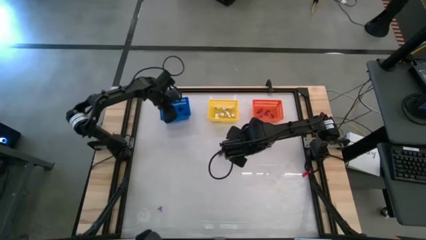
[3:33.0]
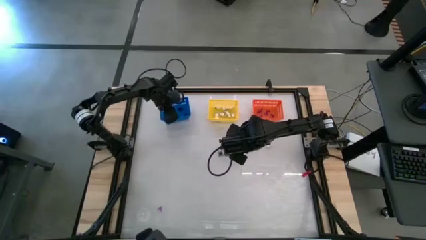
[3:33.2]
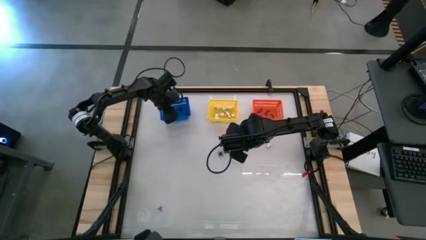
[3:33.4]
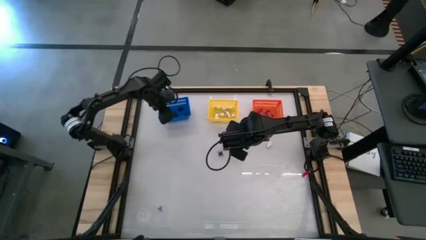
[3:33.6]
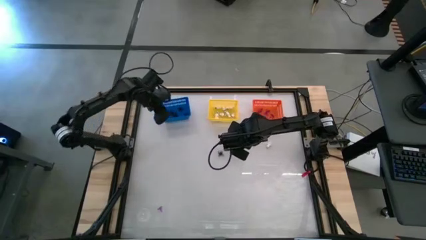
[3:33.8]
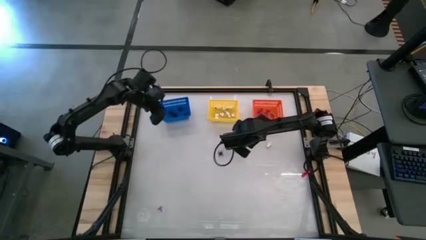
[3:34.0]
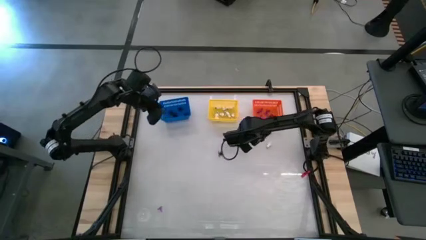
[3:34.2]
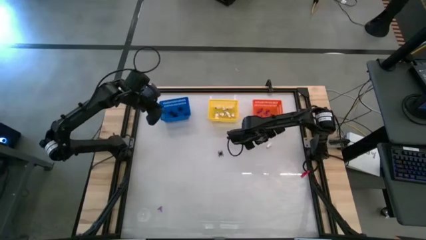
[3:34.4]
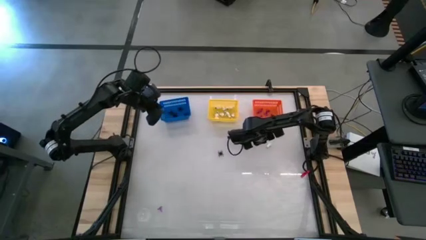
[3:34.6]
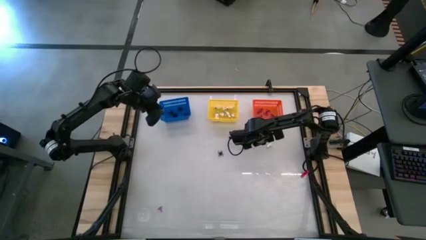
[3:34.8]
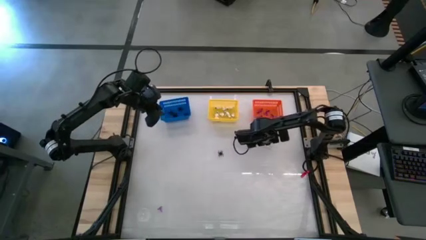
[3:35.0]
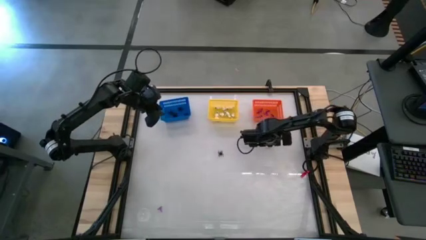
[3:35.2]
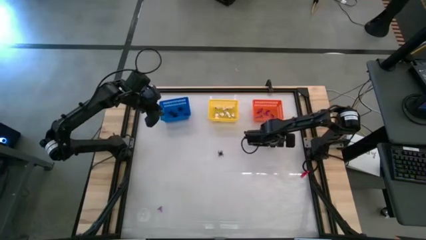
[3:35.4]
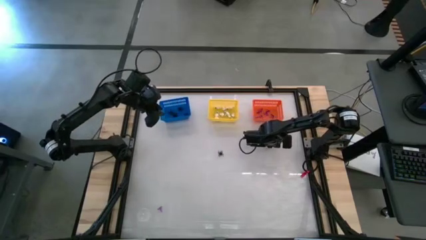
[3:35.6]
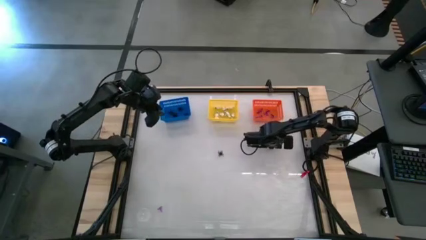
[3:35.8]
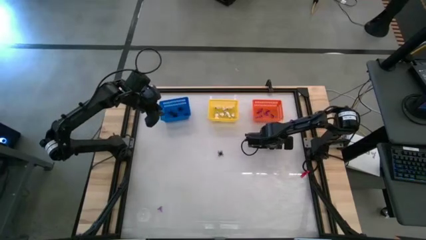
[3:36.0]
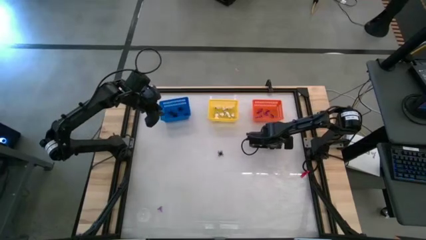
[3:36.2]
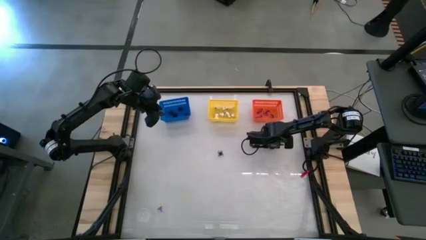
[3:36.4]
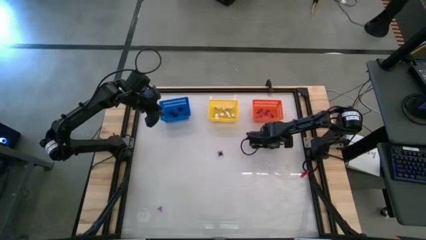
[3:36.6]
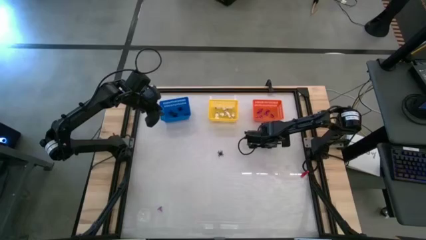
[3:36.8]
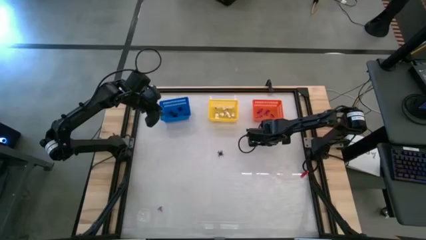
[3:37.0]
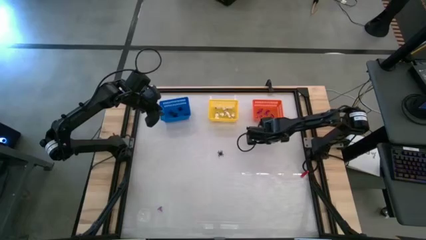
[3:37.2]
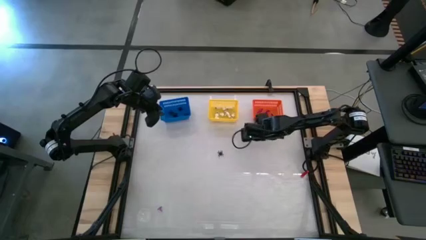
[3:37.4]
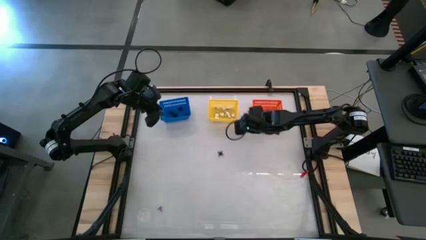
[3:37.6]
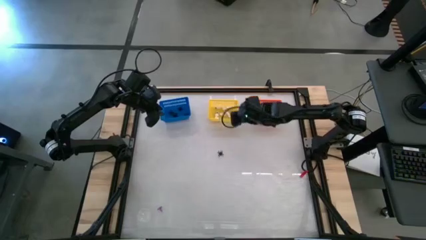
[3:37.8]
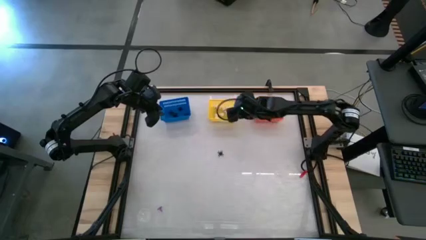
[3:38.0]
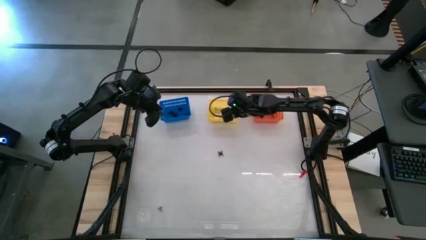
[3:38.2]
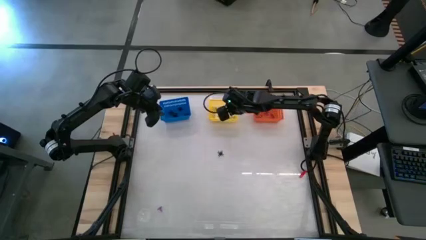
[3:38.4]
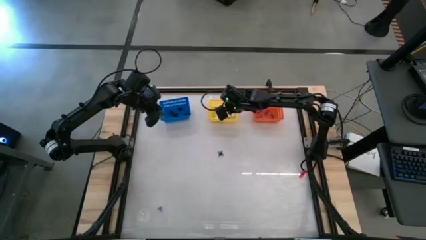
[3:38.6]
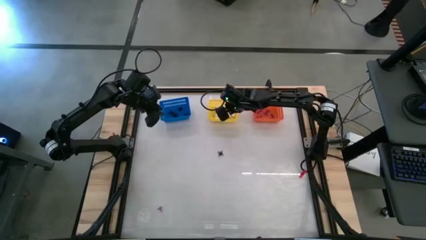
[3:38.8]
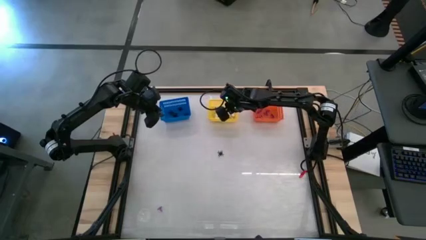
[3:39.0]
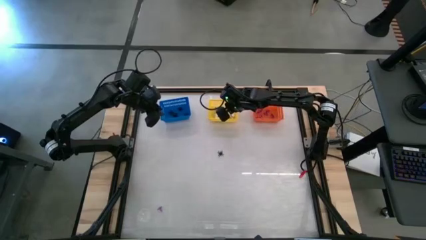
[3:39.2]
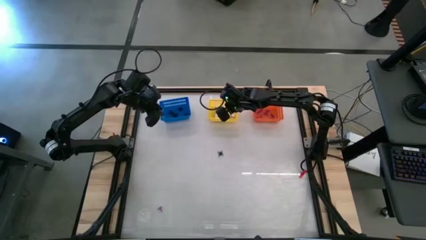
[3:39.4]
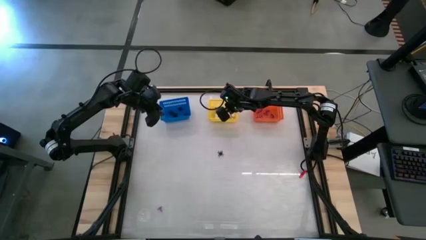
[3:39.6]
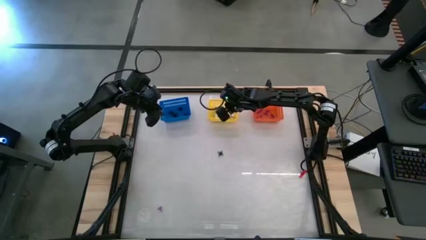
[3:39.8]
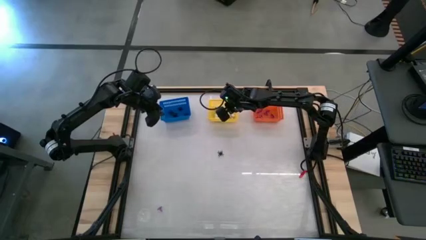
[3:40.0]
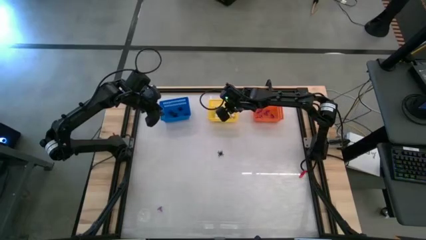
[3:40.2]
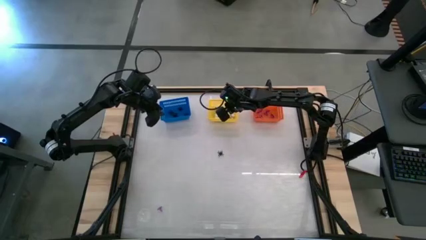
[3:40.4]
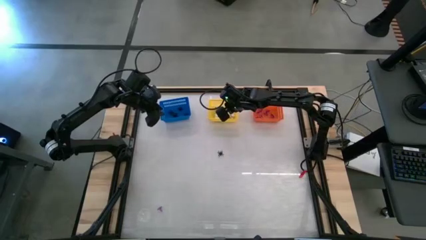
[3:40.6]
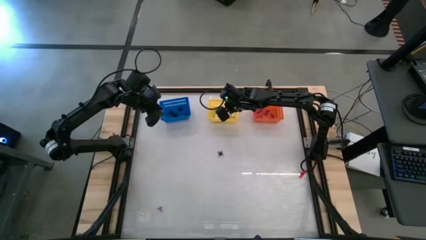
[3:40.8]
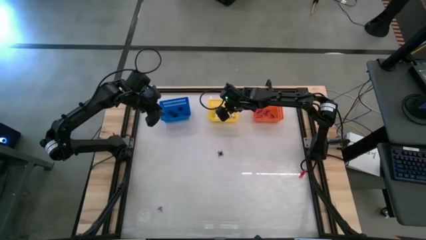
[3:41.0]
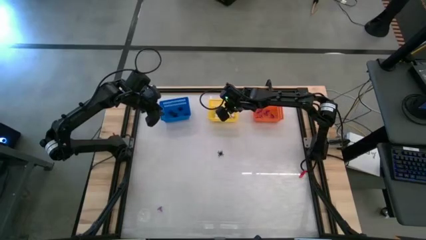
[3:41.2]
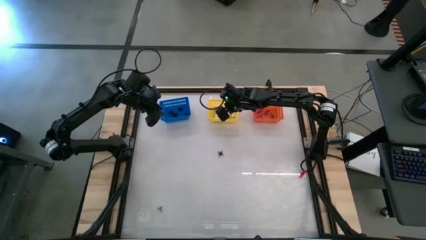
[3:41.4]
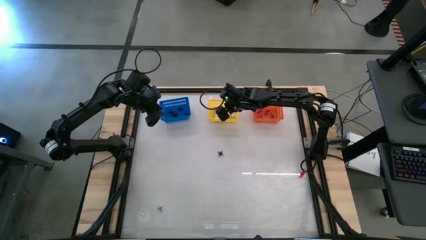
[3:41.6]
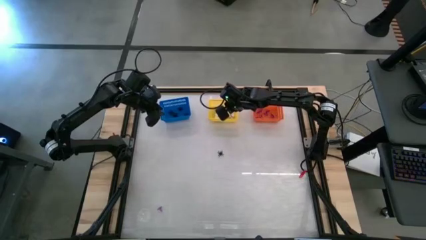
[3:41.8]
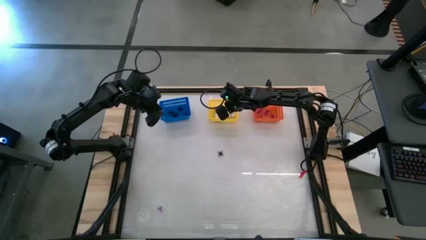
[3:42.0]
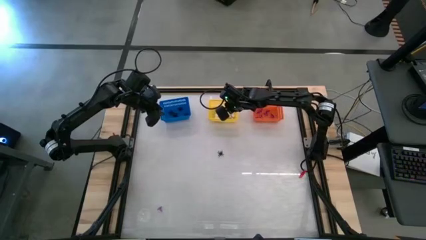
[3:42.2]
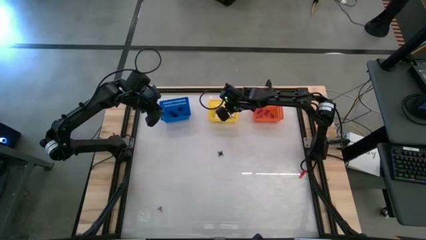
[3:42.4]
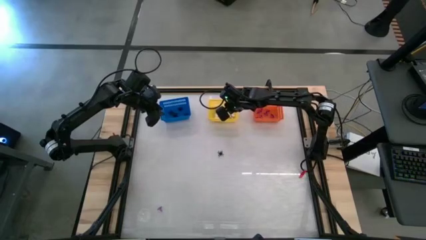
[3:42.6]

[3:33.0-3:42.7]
Task: Sort Halloween decoration
Put the white skeleton toy into the yellow basket

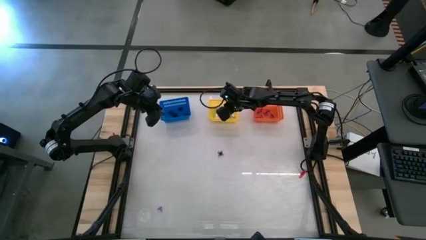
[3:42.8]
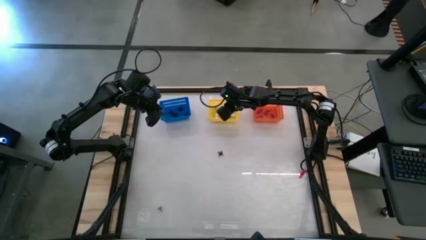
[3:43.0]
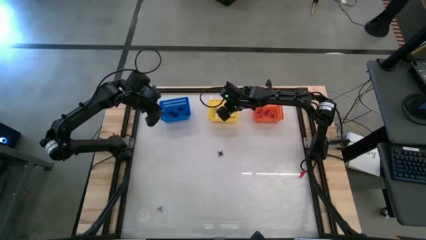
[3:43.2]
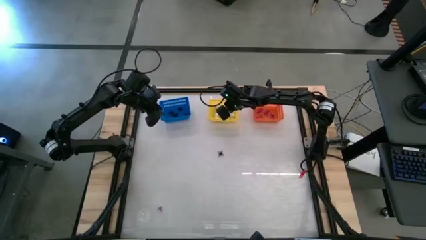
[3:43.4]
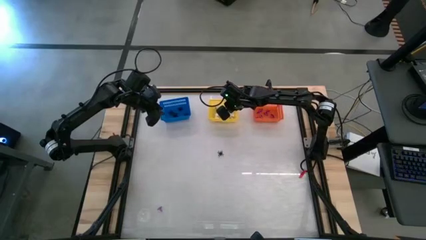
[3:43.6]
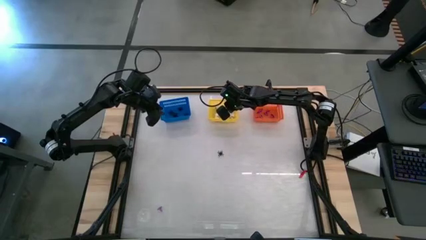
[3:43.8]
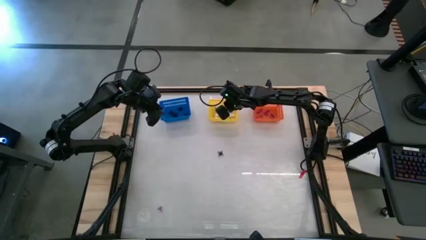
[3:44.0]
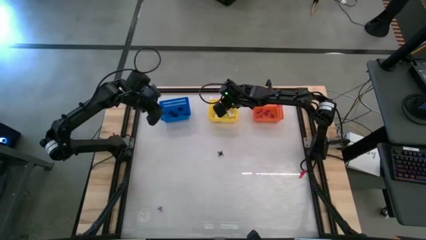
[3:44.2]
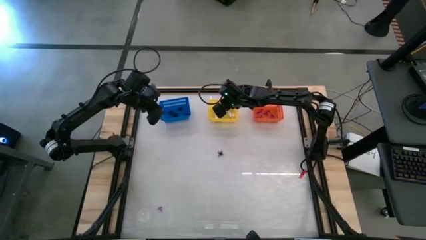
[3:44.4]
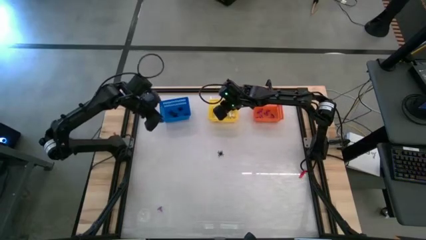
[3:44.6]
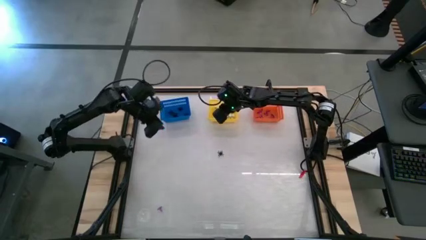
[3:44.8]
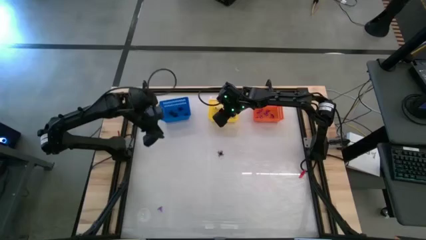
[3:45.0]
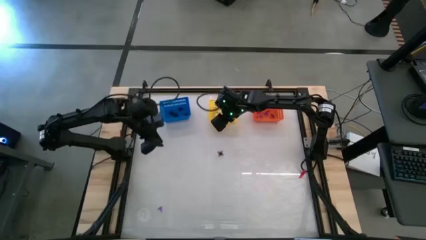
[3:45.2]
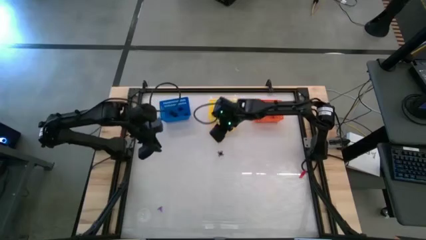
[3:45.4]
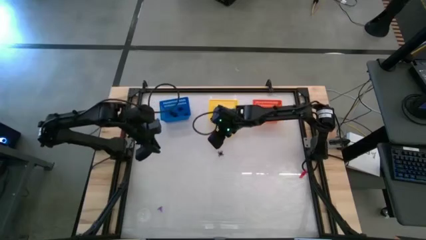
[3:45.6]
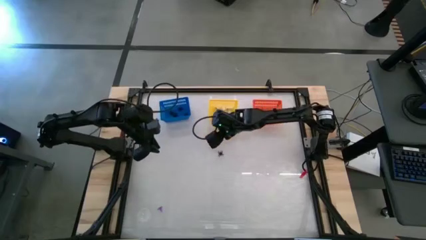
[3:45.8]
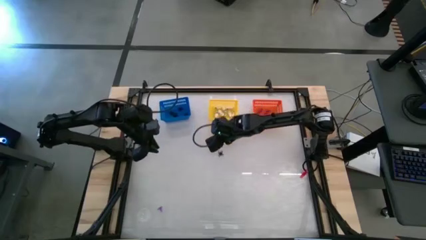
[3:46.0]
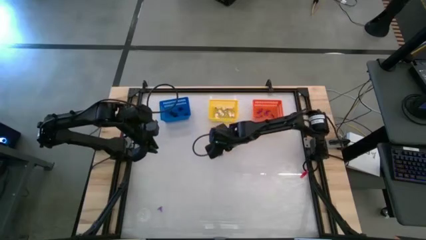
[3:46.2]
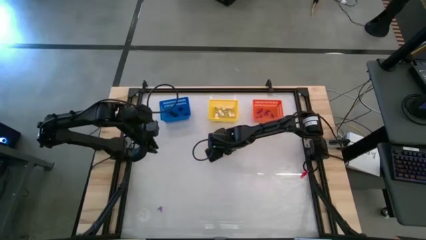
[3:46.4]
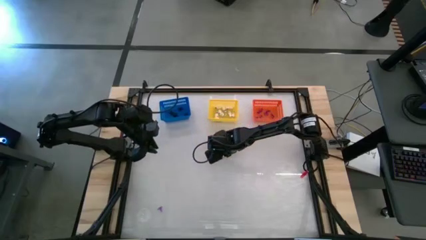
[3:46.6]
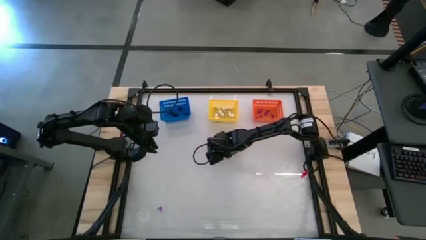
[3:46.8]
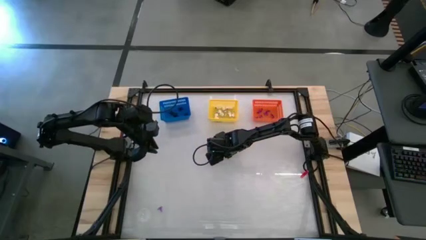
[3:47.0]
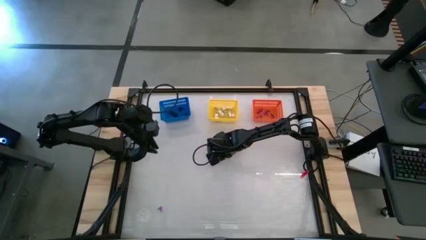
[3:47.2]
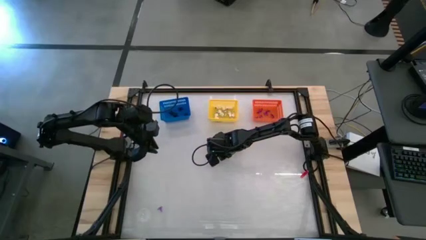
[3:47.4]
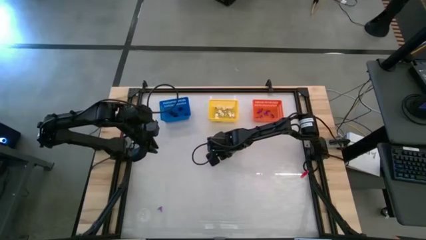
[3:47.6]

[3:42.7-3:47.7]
Put the black spider toy into the blue basket

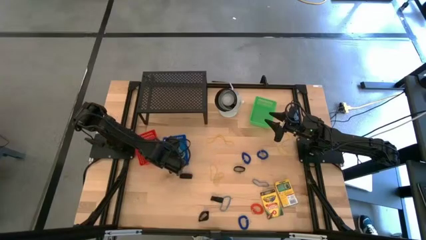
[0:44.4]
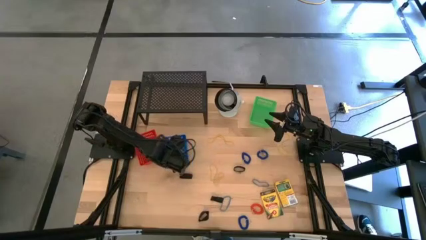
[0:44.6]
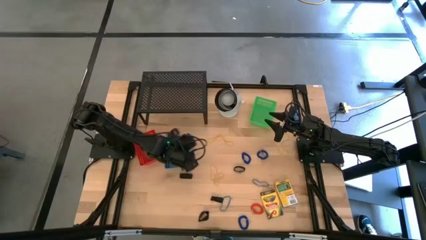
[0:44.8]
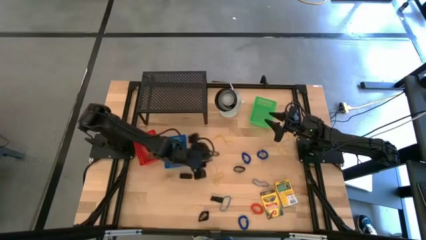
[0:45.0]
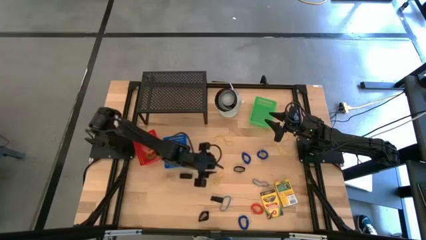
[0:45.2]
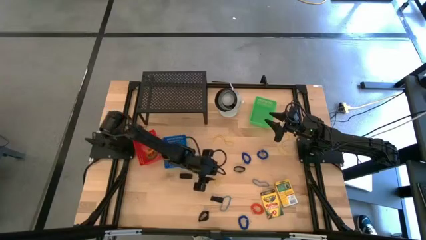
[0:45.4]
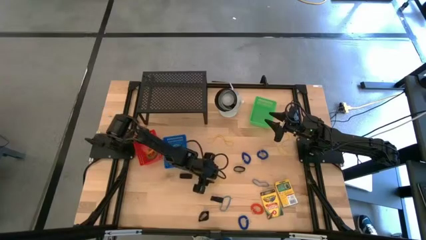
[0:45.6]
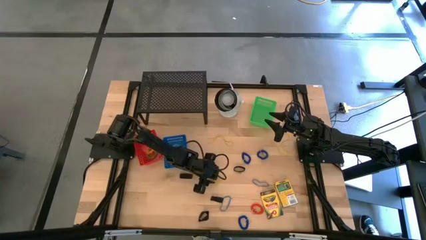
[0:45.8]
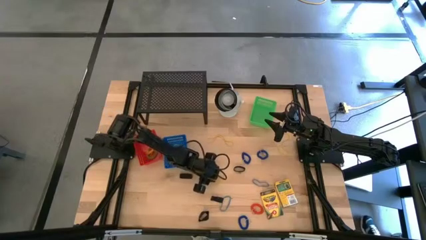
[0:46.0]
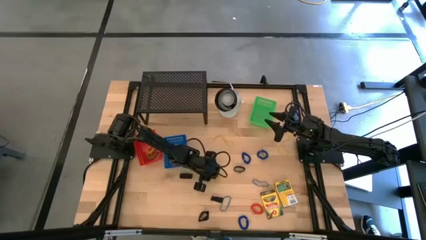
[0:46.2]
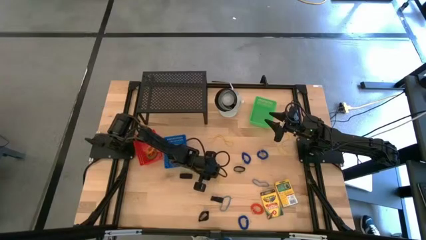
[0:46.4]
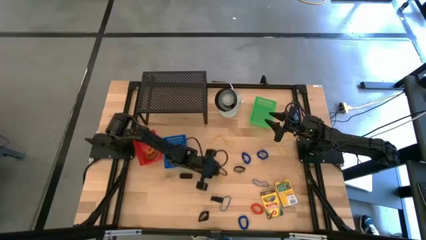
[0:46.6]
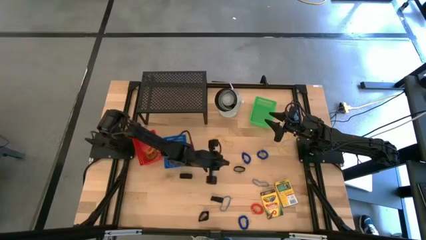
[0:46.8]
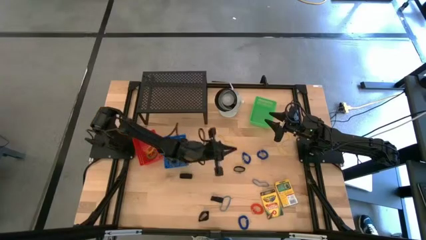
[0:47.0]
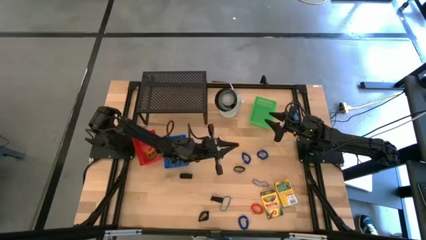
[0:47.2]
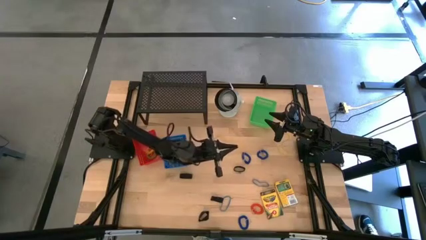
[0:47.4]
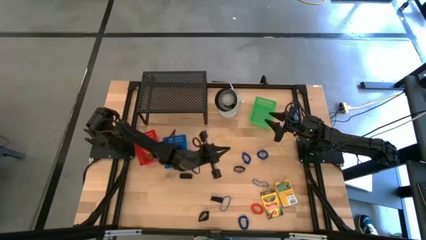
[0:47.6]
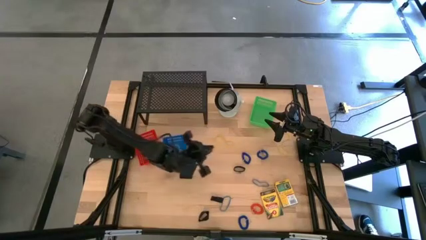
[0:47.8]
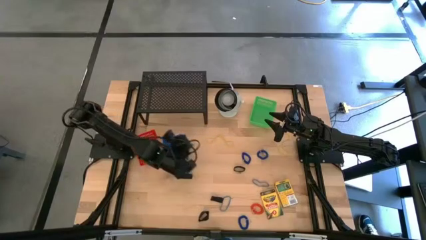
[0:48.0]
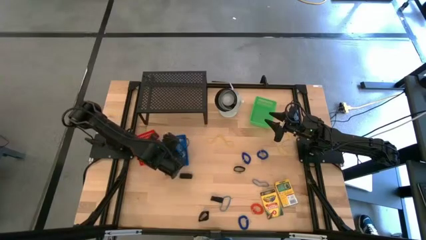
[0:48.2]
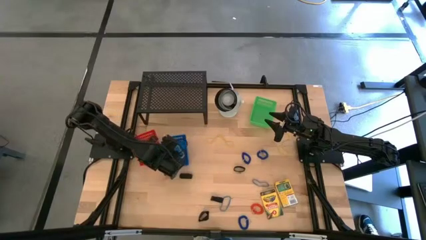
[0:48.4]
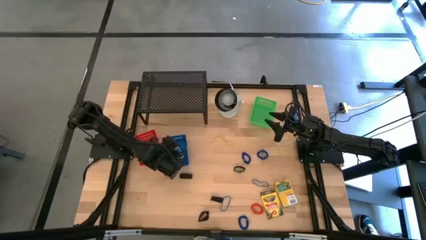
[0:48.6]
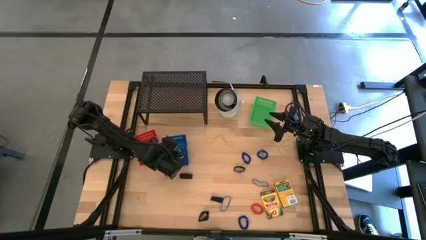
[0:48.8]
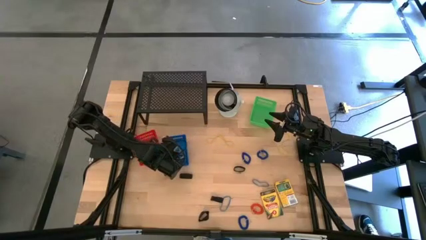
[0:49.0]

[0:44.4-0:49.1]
Task: Pick & Place Office Desk Supplies
Put the yellow rubber band into the blue bin
